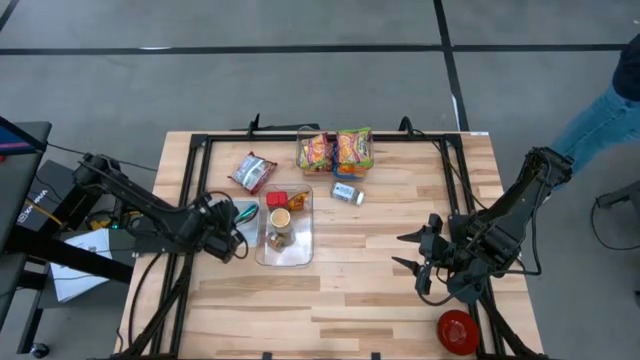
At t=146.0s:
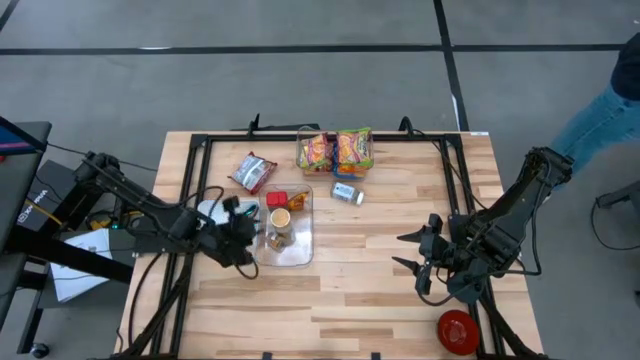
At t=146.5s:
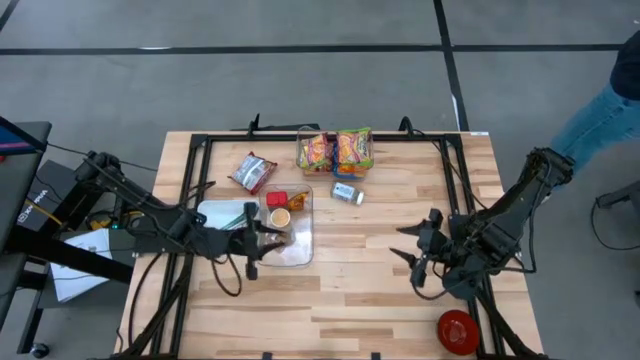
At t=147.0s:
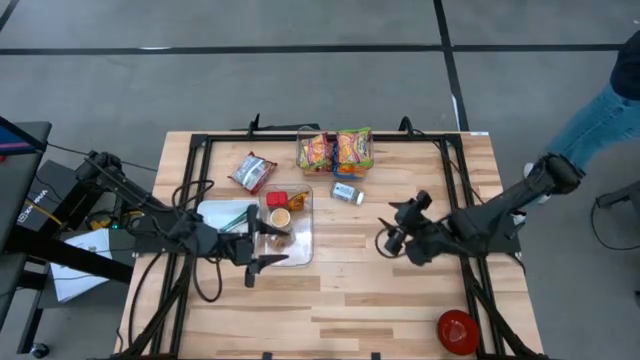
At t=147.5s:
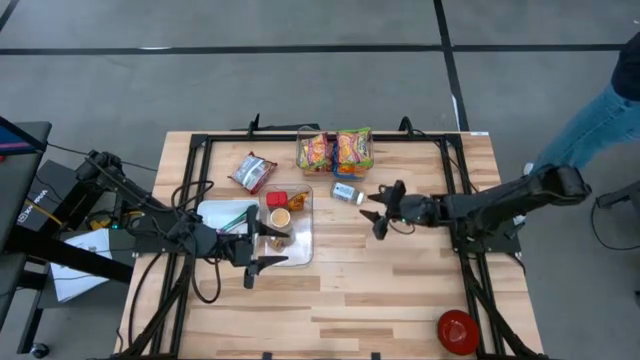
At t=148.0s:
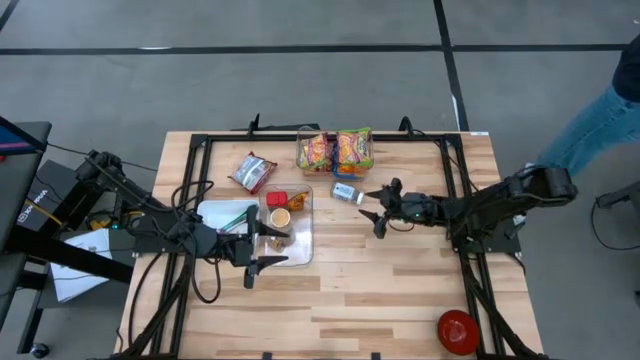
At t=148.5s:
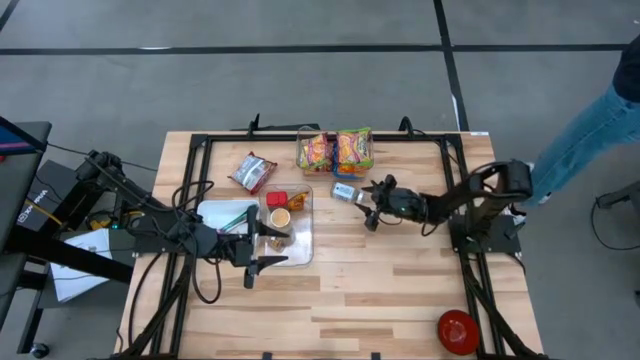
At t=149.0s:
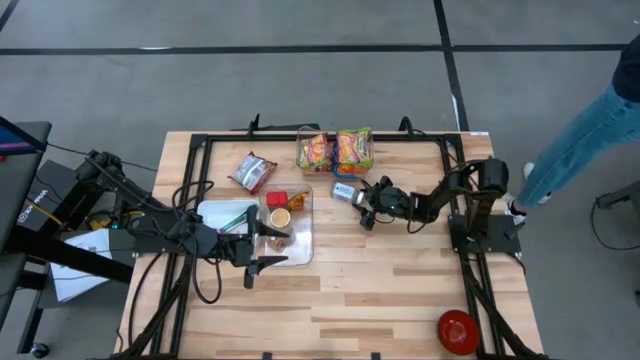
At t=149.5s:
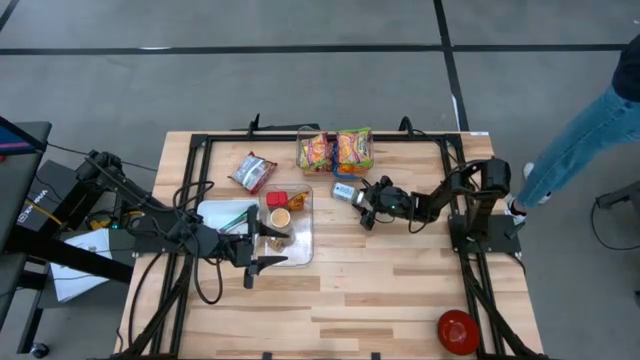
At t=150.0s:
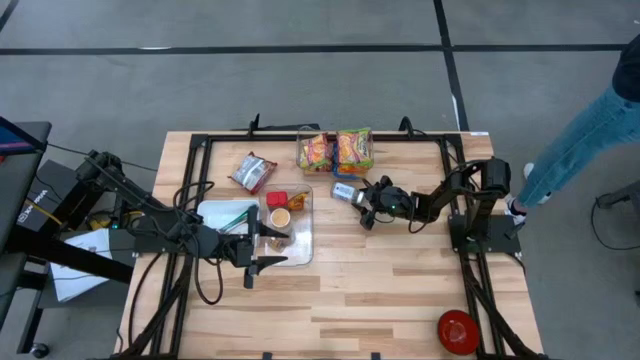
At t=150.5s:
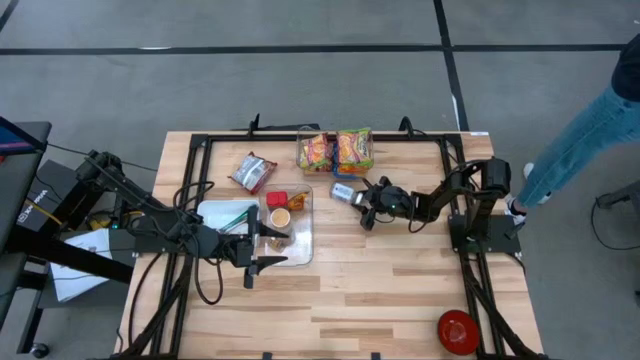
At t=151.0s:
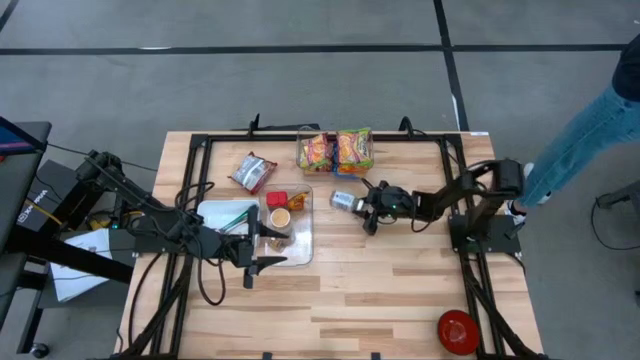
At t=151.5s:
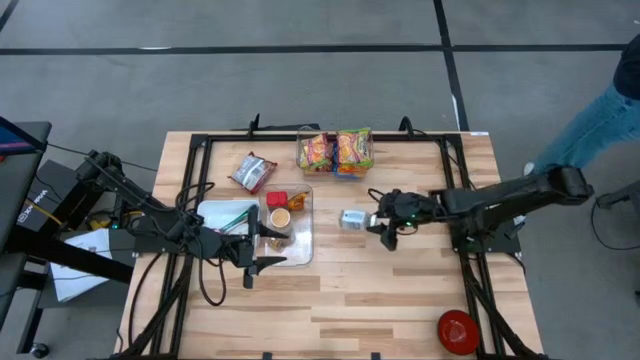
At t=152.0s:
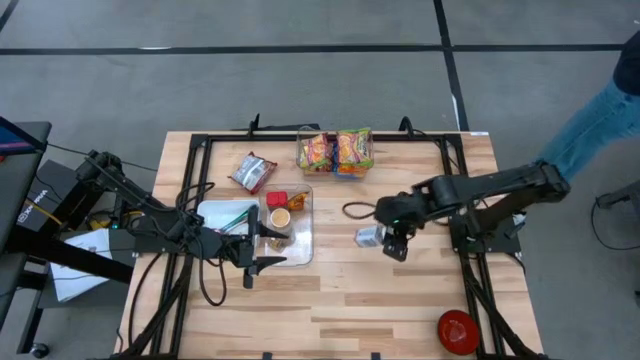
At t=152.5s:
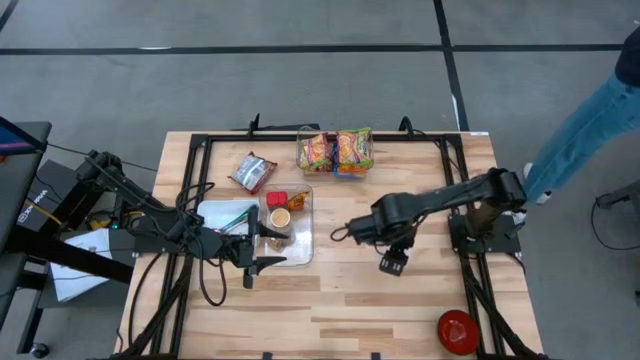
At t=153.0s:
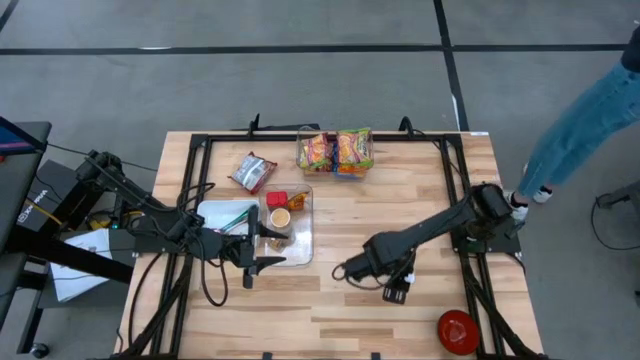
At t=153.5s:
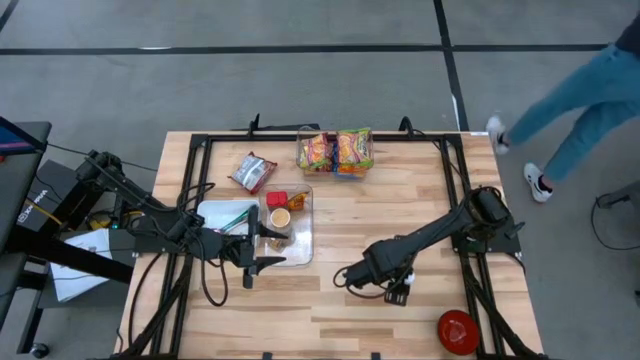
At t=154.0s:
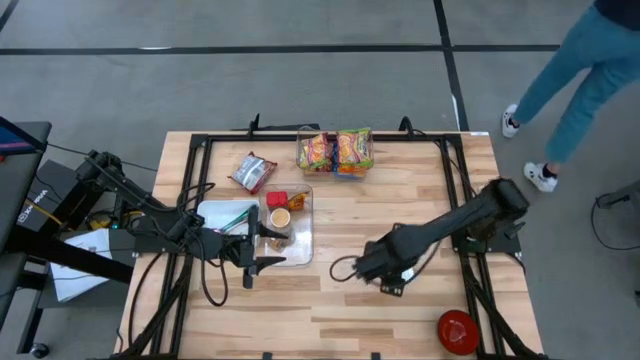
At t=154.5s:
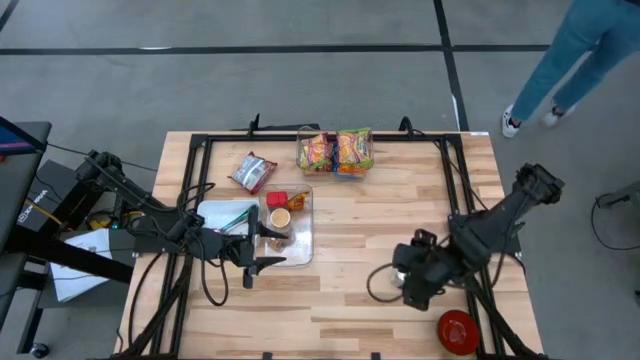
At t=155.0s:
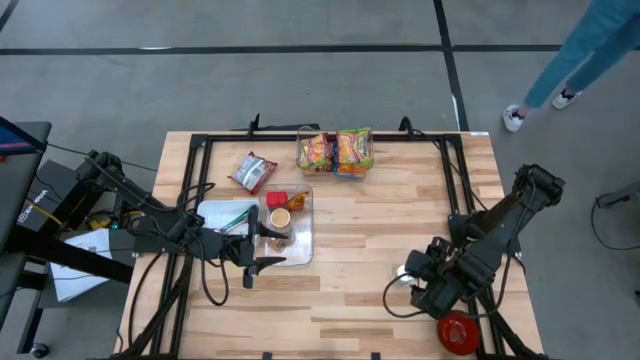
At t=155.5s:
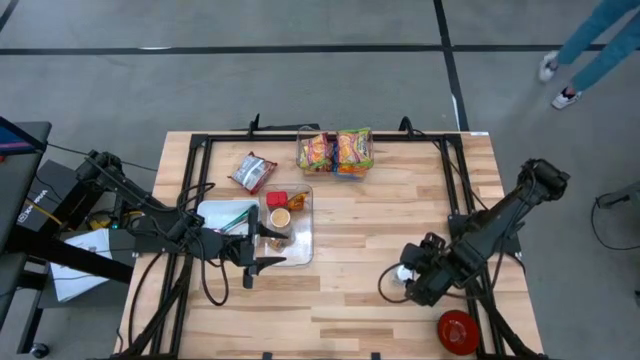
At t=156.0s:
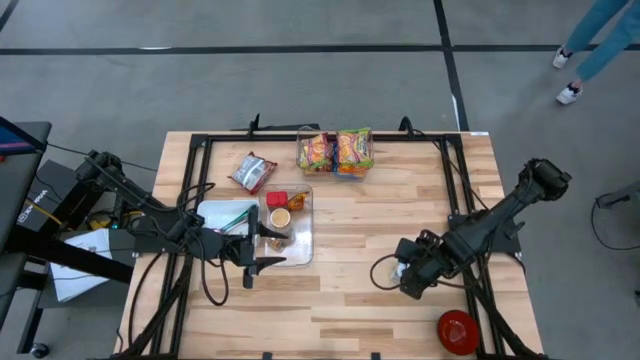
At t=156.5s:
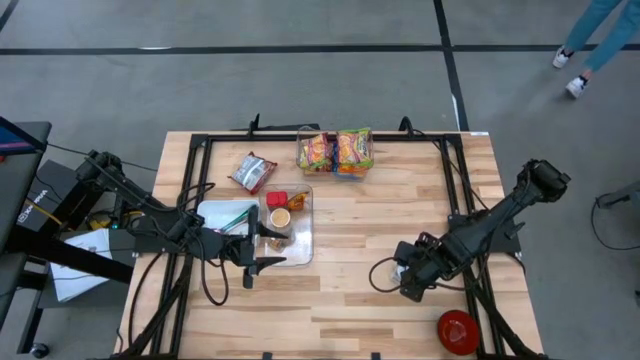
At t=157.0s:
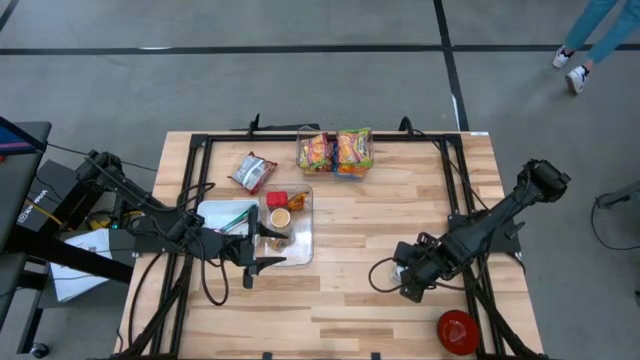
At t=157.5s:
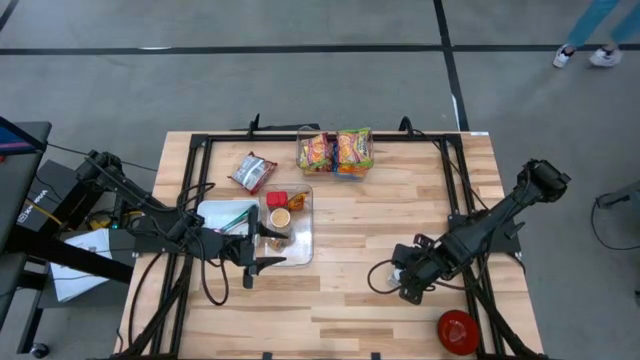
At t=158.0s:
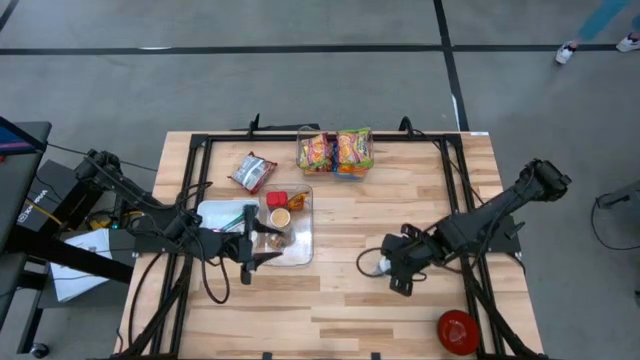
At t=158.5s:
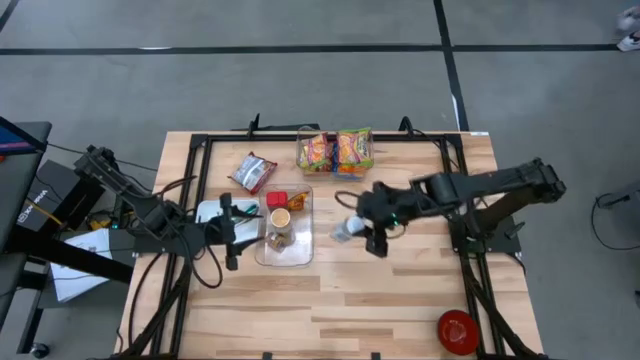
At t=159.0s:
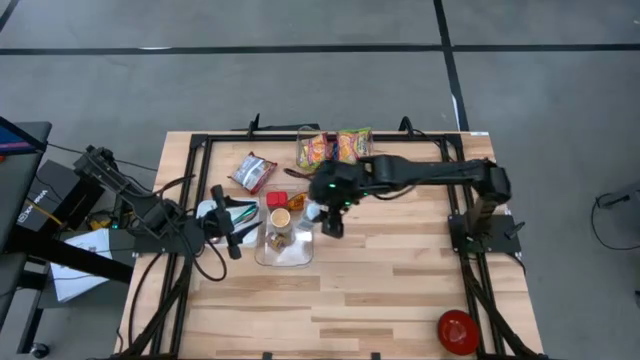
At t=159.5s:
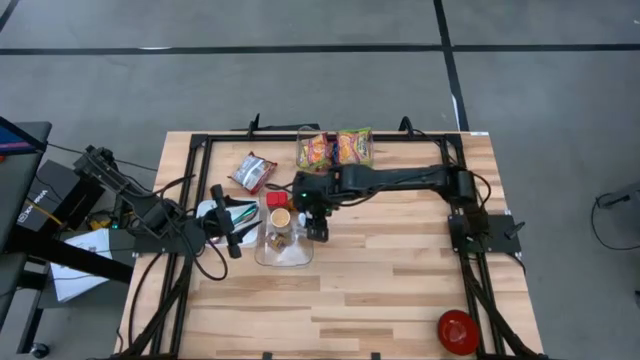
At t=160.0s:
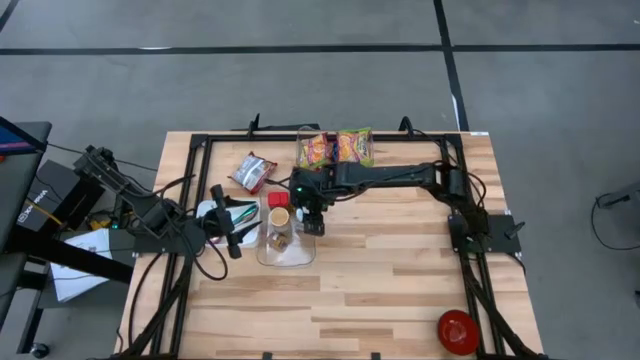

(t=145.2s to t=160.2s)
Task: Pick & Place Food Item
Put the white seasoning bottle into the bottom transparent bin

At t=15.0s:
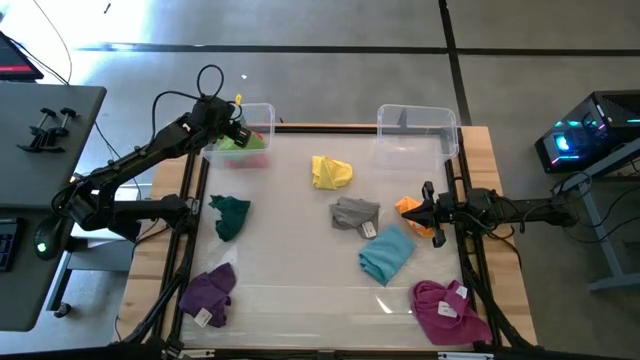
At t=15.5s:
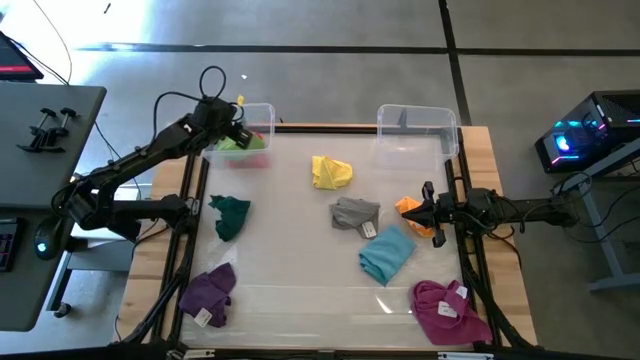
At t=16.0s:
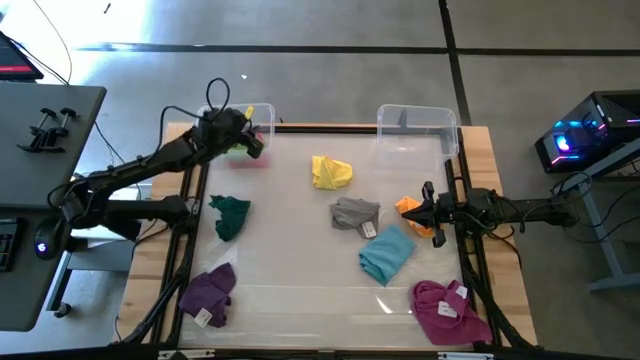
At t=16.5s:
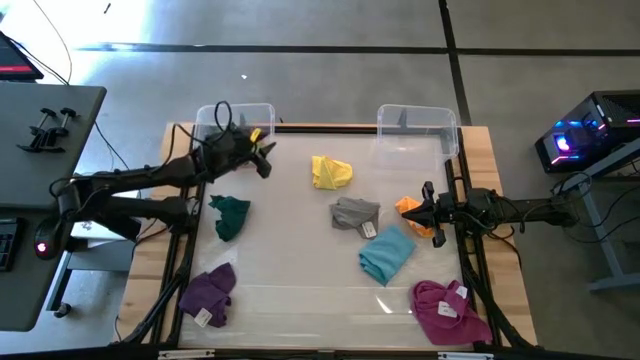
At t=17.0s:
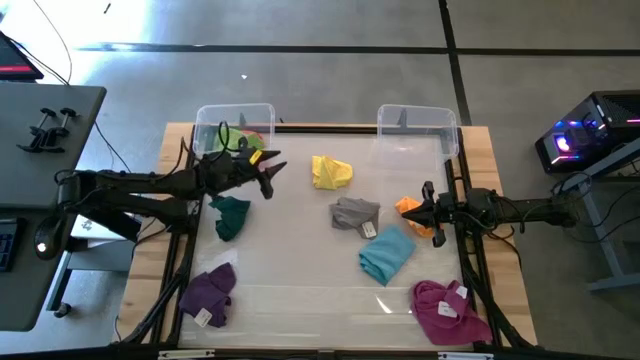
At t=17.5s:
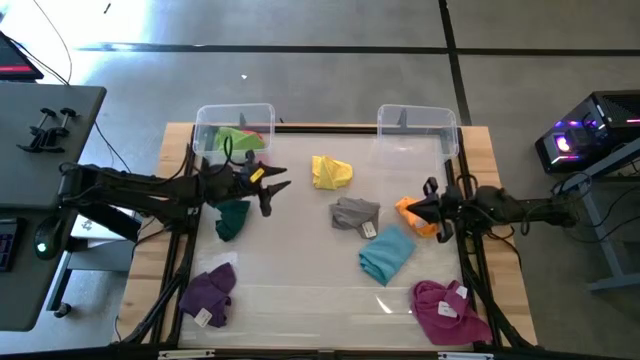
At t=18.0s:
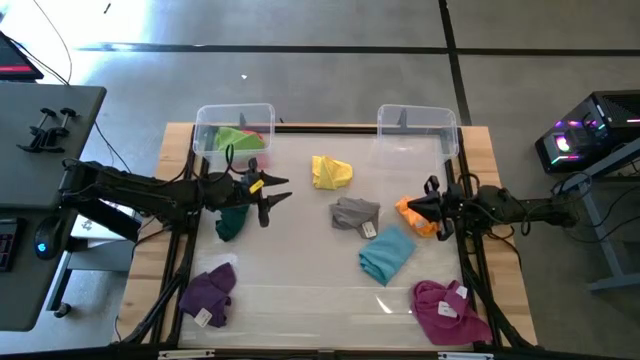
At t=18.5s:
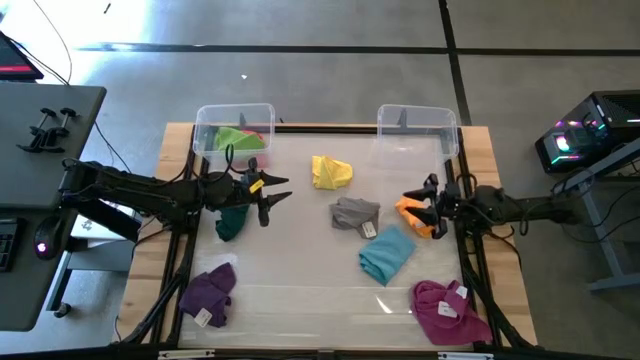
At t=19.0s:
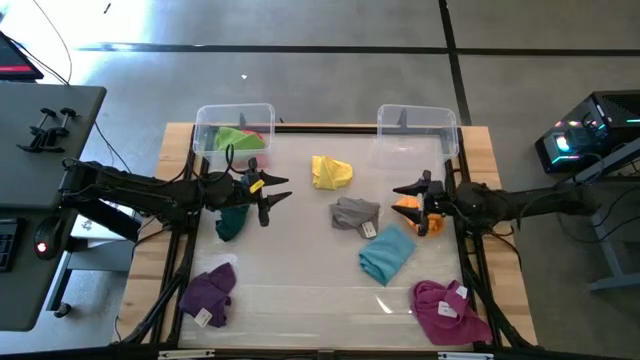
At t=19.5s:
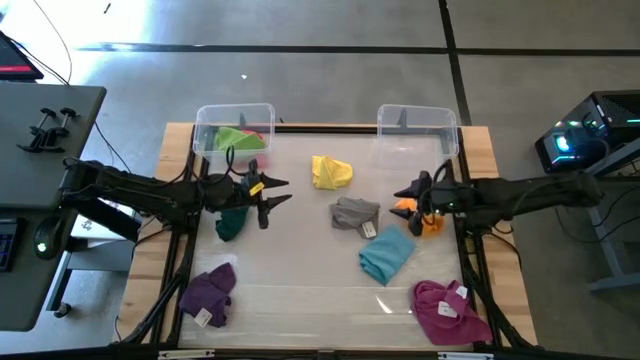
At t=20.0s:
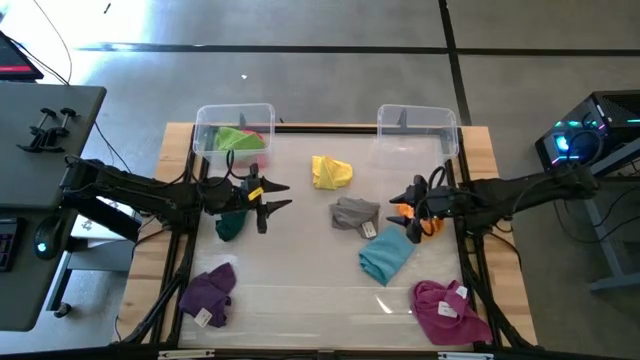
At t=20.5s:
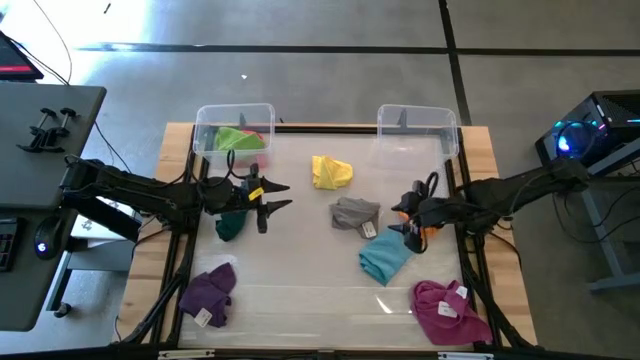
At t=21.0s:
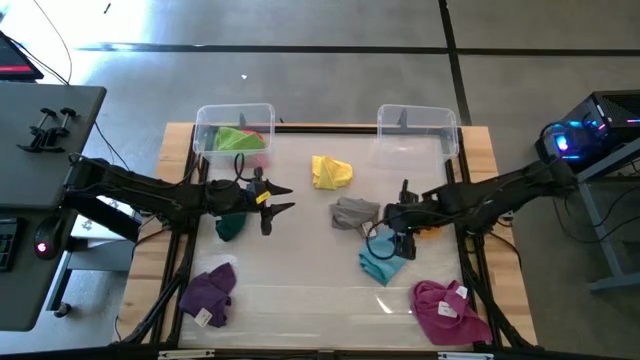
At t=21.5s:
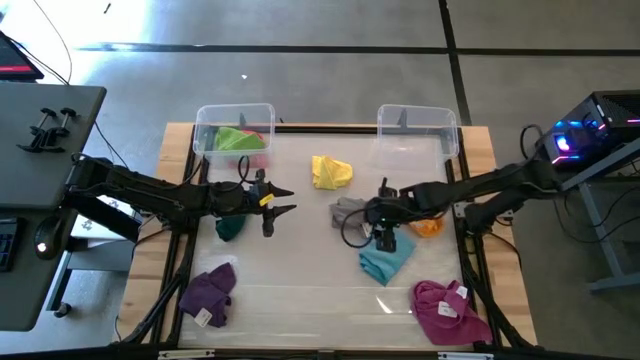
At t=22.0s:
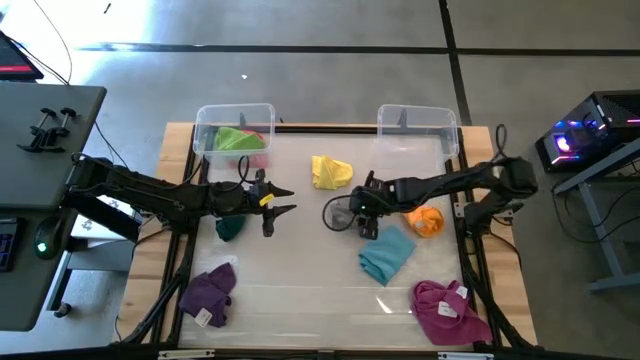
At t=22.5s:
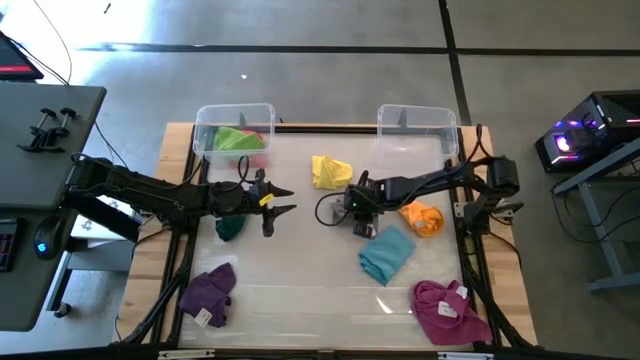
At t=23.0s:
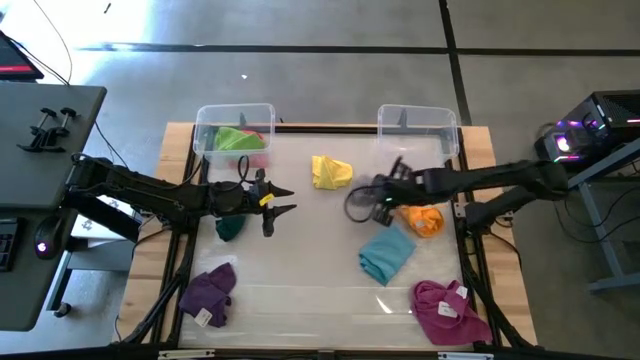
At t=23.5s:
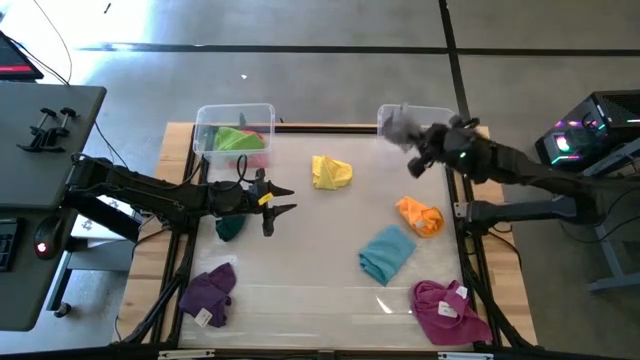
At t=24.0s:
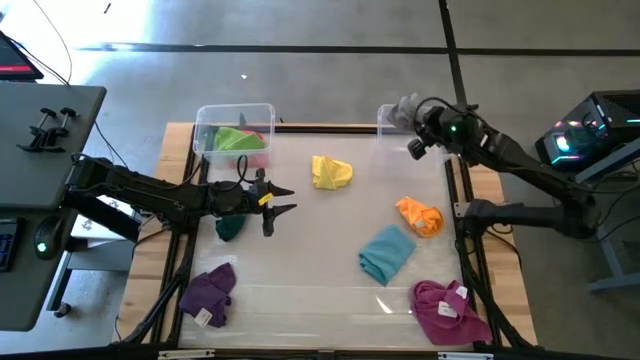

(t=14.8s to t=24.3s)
Task: Sort towels by color in basket
Put the gray microfiber cloth into the right transparent bin
